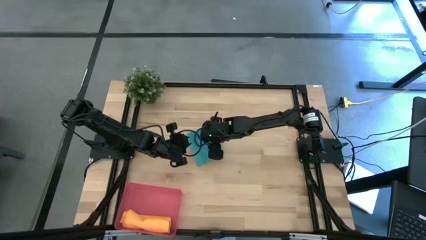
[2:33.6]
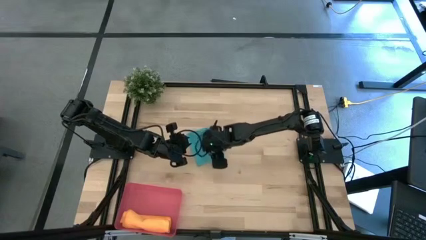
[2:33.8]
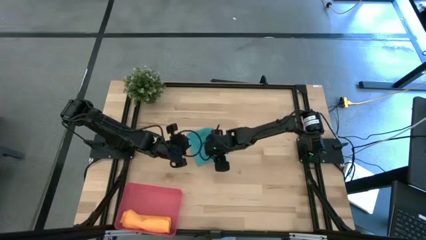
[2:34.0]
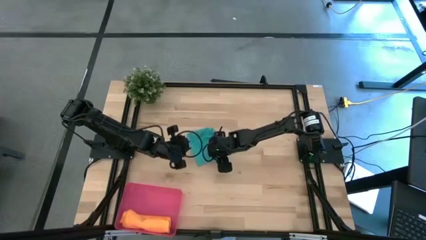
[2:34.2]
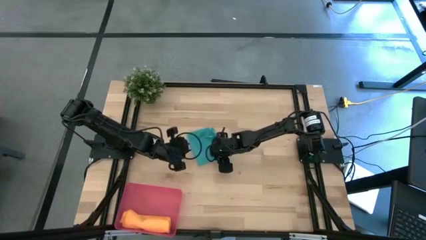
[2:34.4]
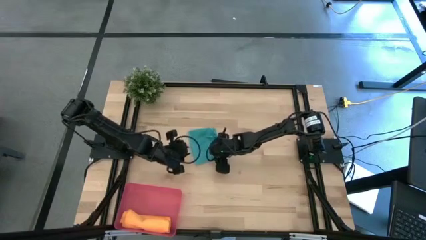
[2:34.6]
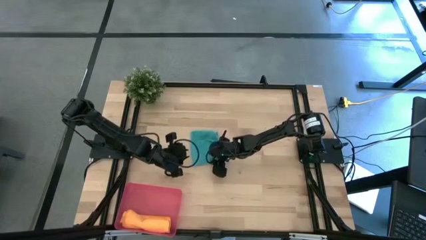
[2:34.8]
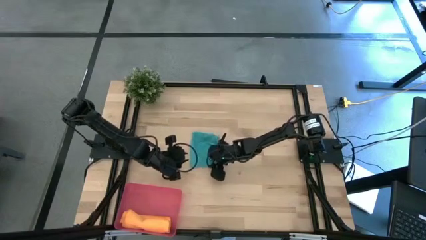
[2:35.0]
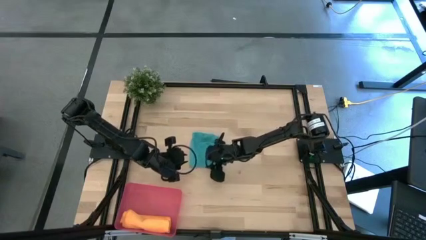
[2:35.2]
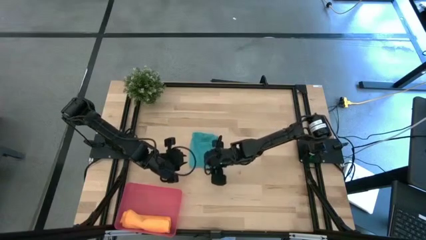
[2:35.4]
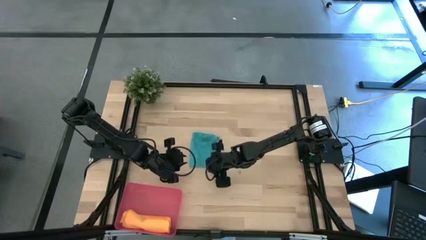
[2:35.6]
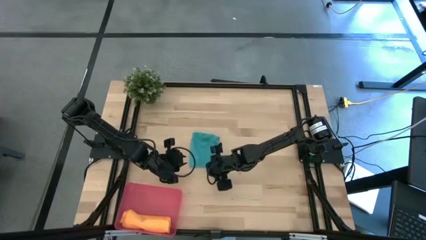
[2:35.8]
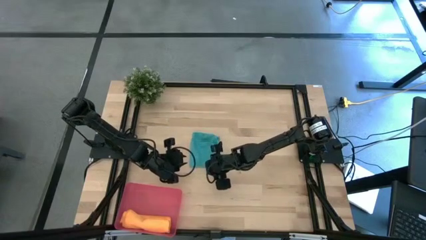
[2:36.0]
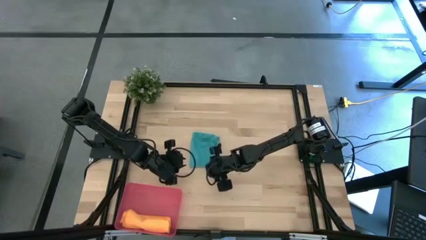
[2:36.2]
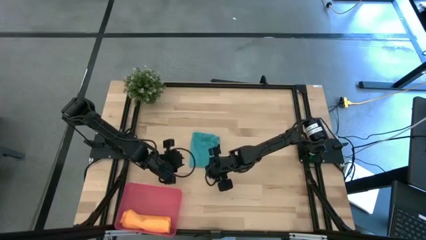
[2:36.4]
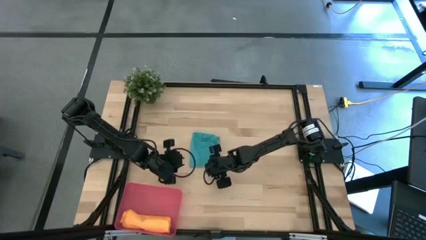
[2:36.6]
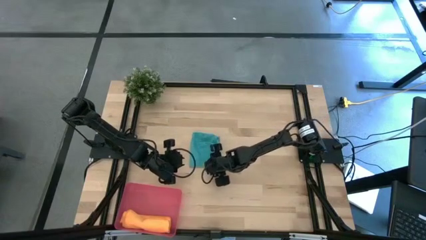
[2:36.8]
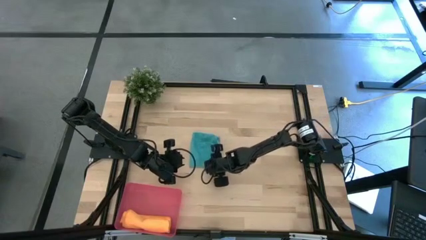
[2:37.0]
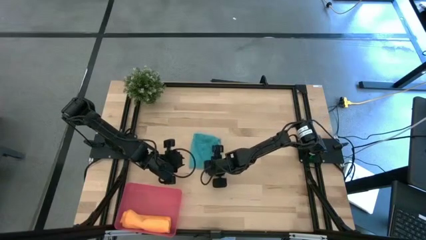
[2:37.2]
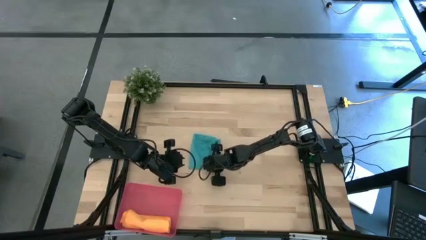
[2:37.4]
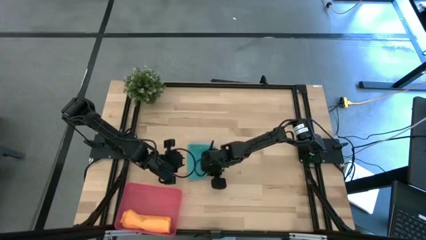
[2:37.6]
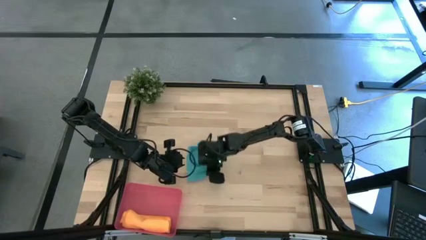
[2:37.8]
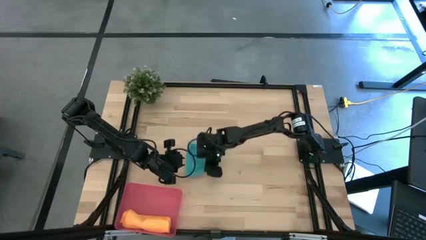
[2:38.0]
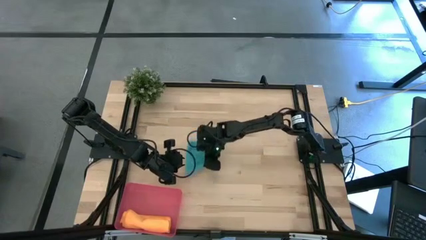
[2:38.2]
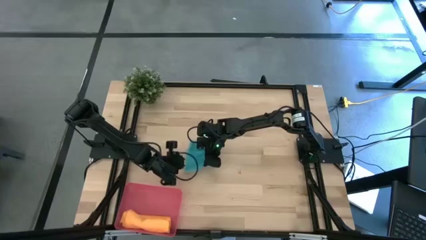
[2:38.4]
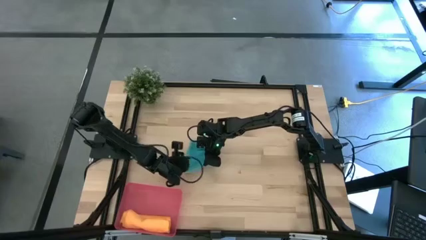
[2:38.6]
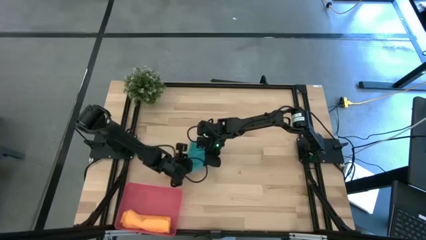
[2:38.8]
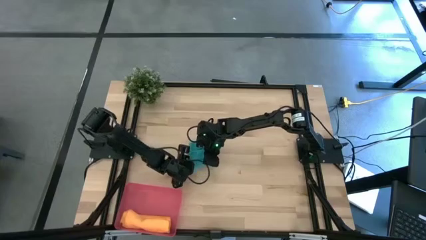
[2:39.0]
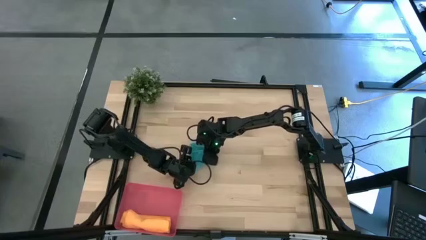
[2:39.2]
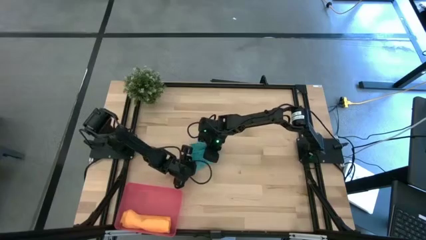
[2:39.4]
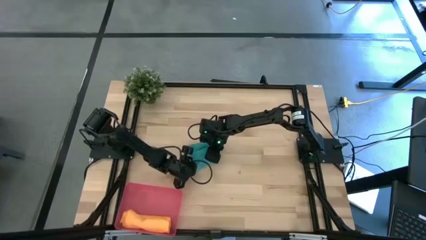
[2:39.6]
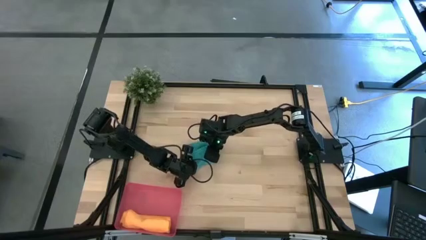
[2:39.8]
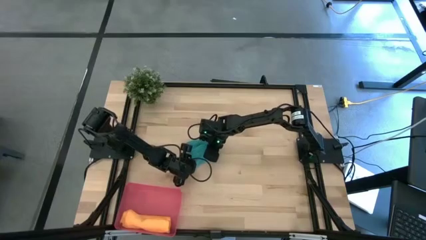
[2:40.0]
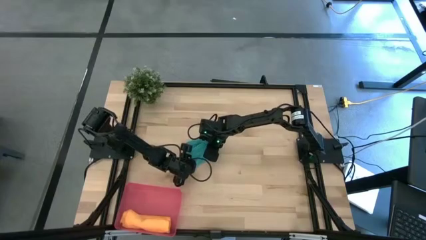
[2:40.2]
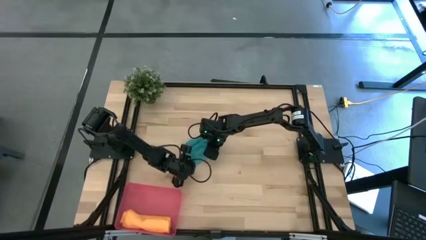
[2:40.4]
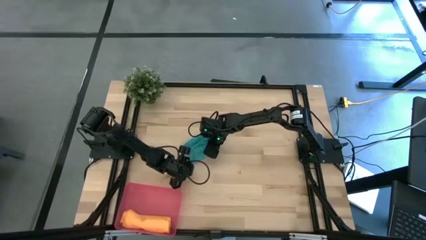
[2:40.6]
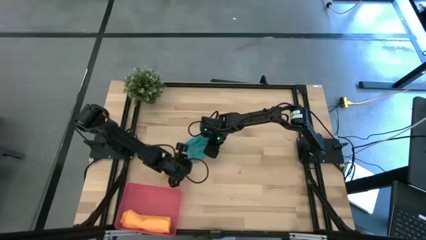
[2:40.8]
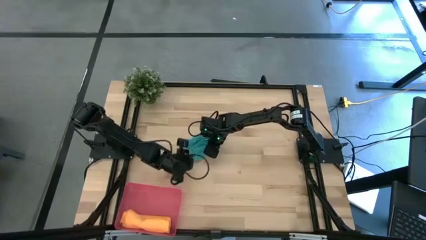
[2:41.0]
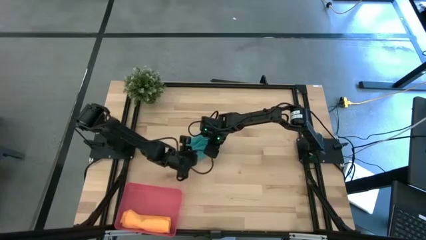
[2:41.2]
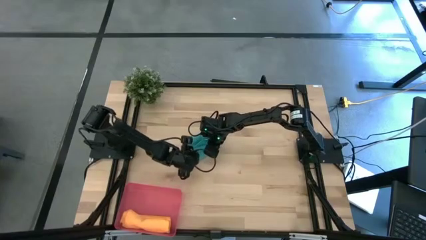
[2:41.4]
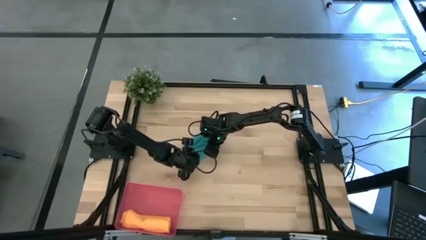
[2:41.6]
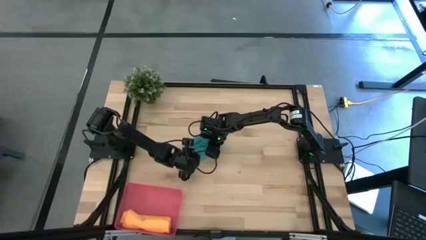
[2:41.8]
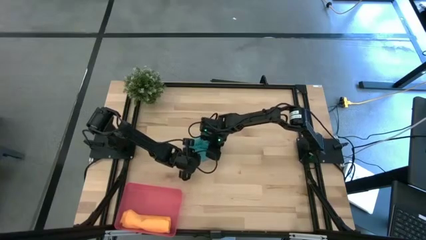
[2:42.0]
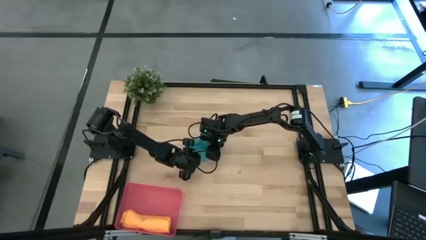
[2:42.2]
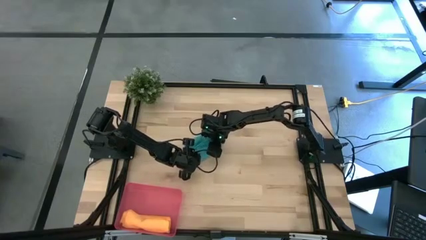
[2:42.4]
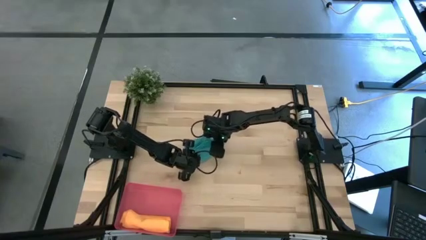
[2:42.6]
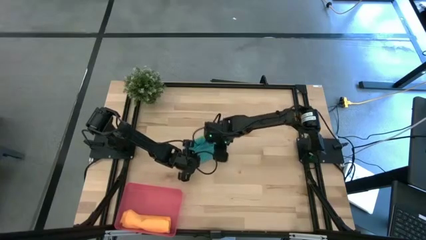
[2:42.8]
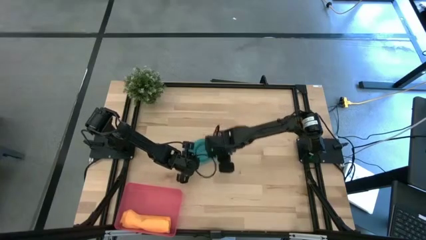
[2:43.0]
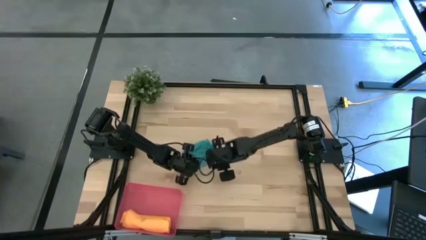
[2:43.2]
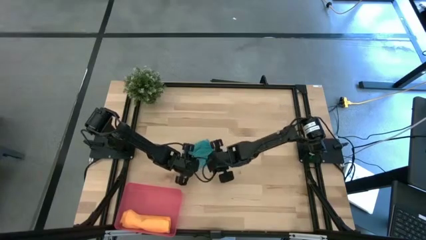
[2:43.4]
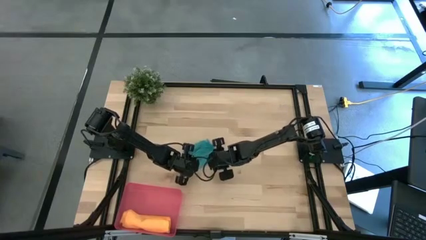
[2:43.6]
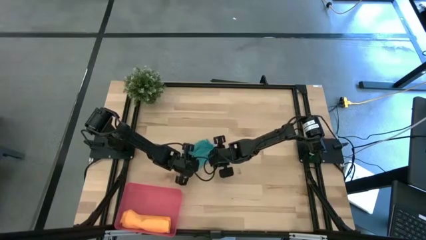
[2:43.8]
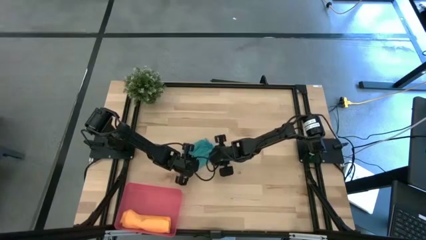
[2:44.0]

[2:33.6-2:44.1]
Task: Roll microfiber towels into tight, uniform cylinder then place into a basket
Roll the blue microfiber cloth

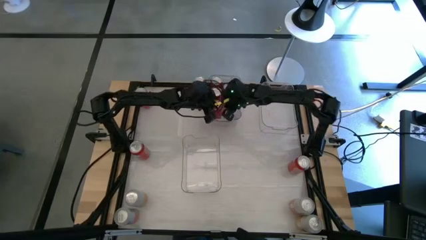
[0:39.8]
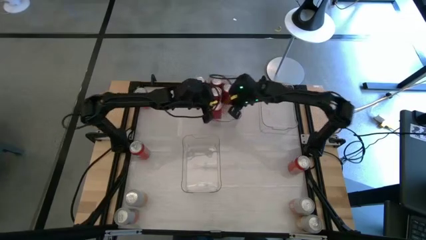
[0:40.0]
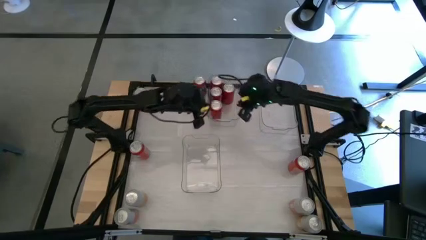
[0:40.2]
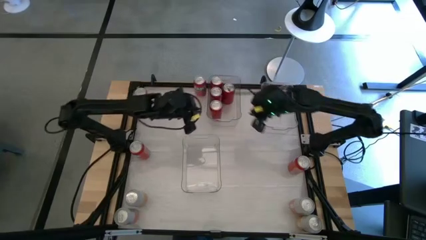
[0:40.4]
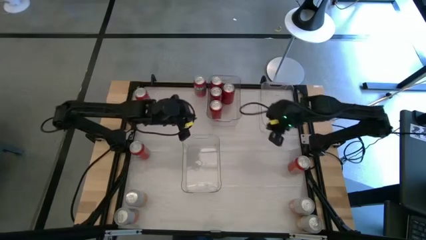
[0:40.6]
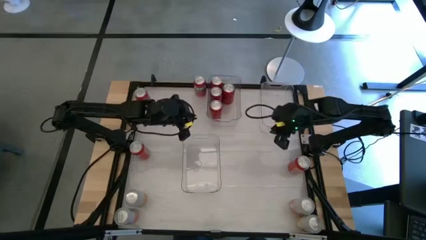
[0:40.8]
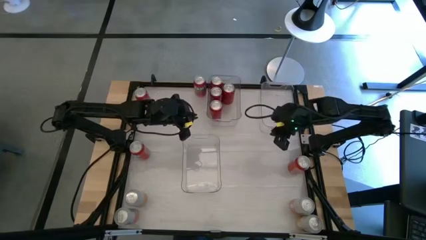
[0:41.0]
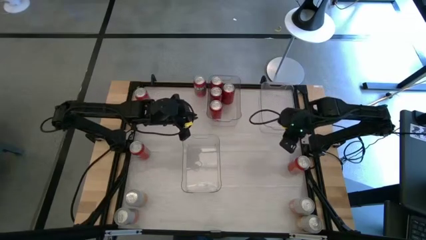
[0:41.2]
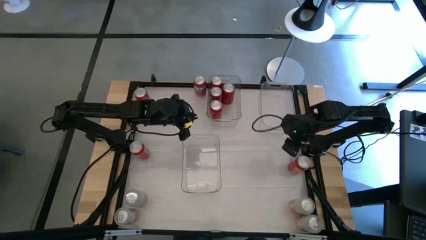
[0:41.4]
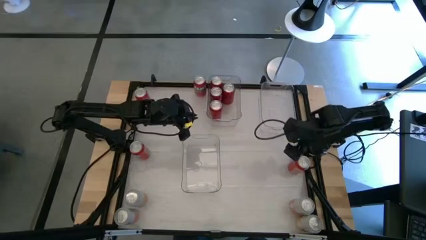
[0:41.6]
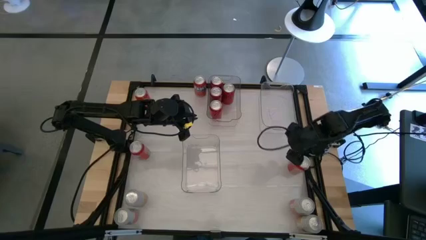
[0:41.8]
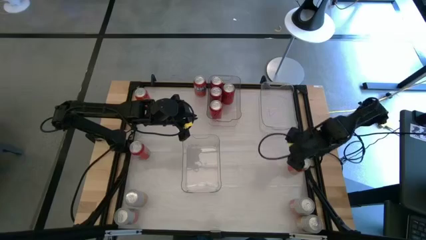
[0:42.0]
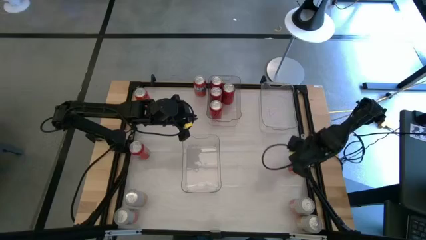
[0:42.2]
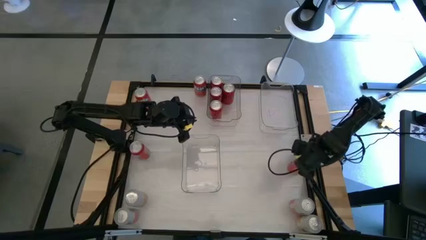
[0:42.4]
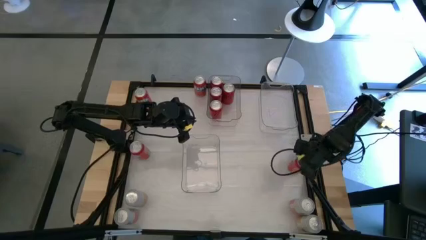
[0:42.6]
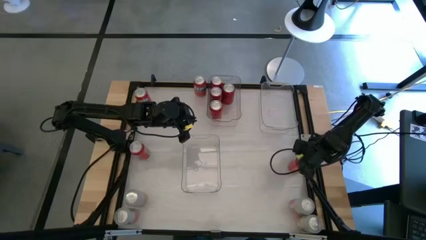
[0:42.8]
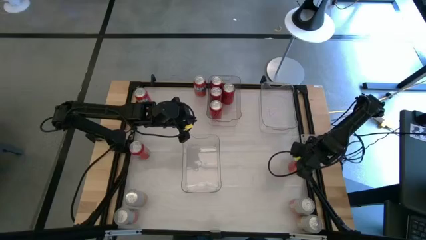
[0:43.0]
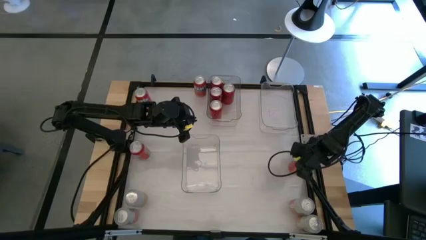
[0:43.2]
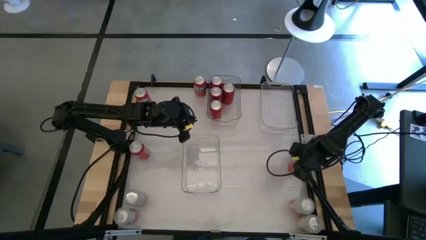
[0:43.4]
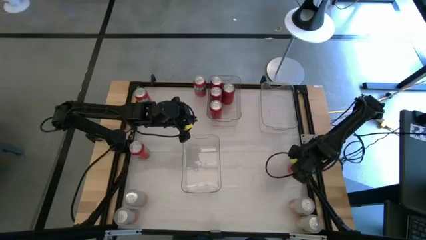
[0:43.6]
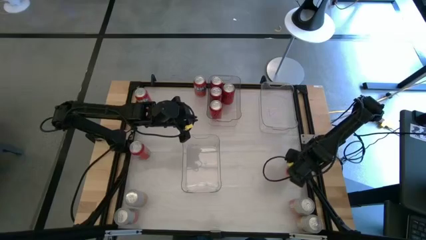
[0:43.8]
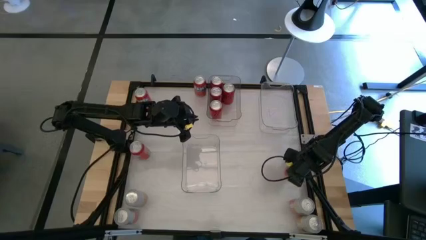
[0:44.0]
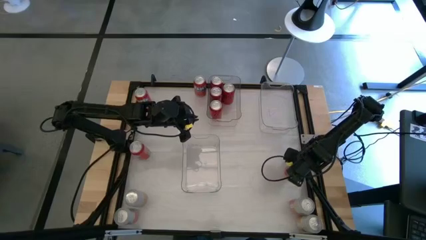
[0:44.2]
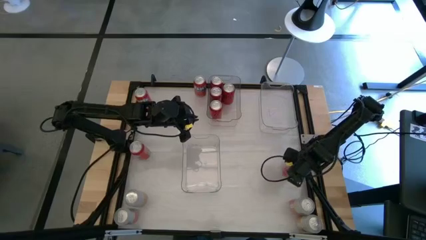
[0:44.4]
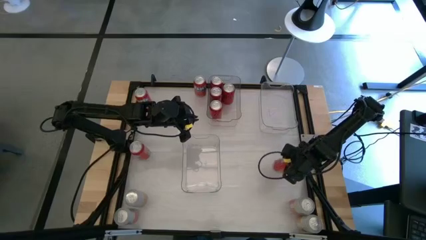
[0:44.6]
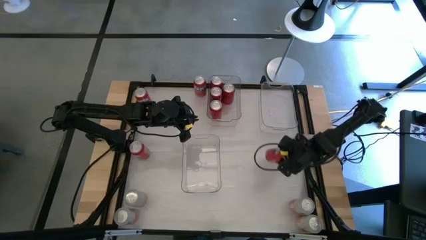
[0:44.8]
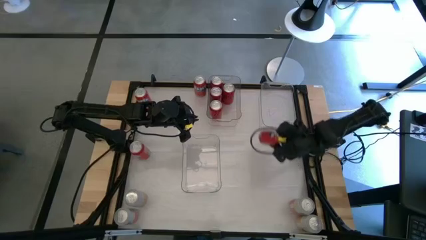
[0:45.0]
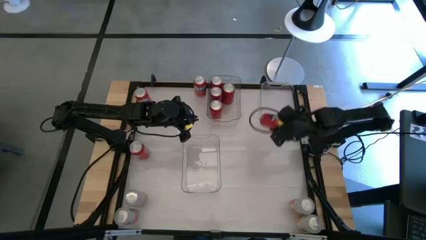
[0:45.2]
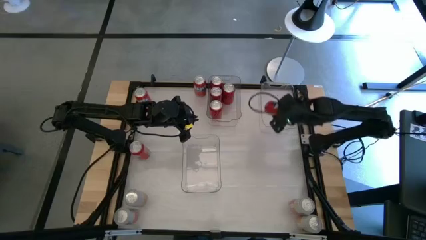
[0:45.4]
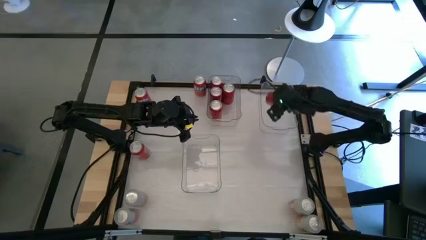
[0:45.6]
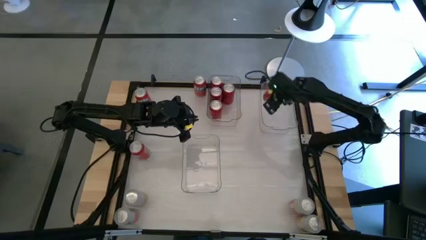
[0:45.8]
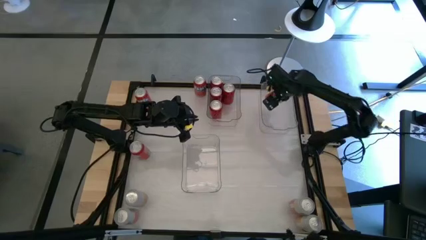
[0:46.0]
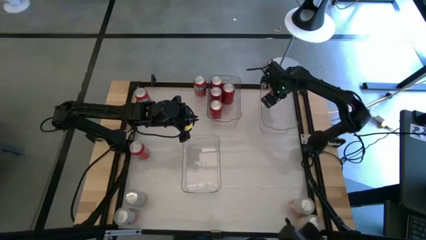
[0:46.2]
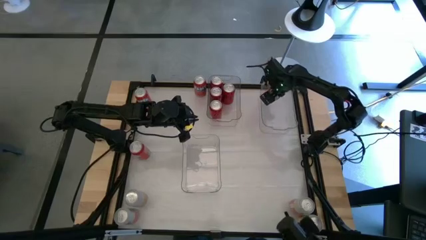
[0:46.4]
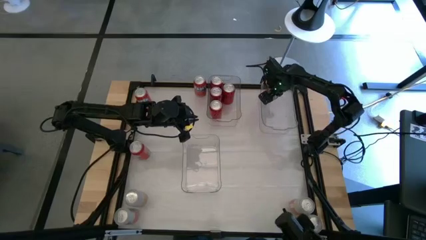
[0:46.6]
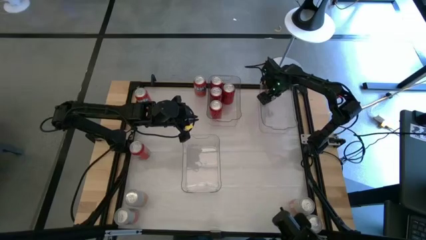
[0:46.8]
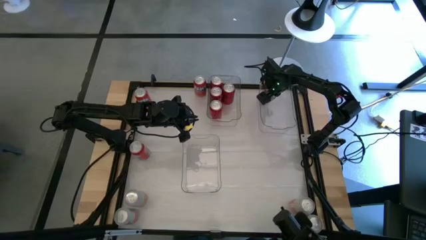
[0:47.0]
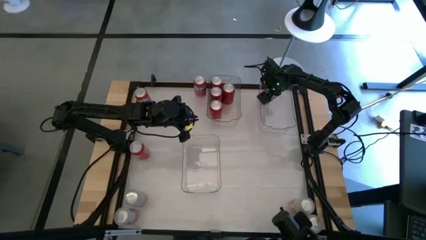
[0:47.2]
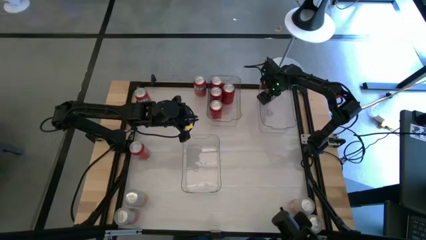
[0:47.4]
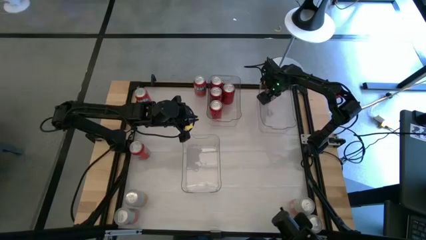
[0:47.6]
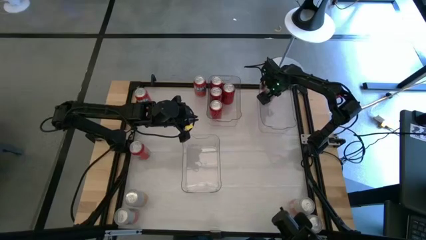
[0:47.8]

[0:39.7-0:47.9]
Task: Sort soda cans
Put the bottom right red soda can into the top right transparent bin
